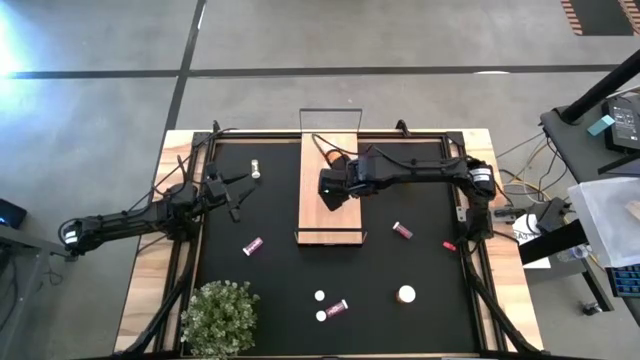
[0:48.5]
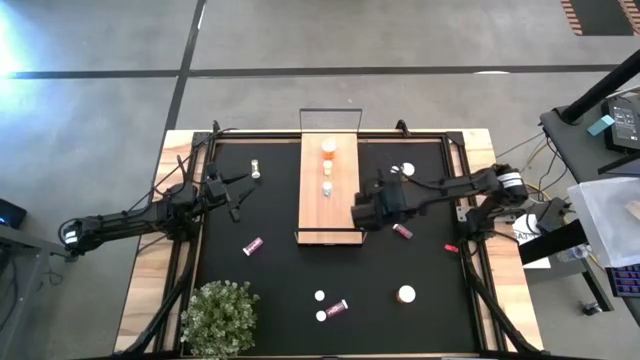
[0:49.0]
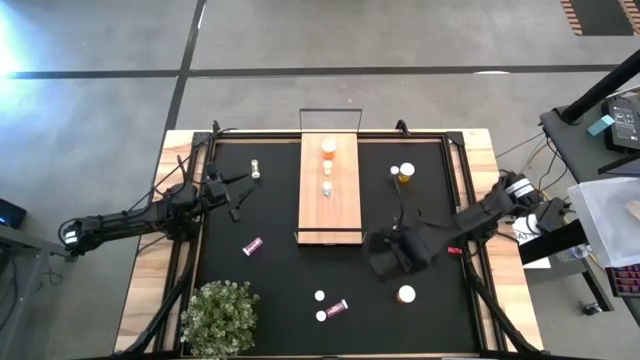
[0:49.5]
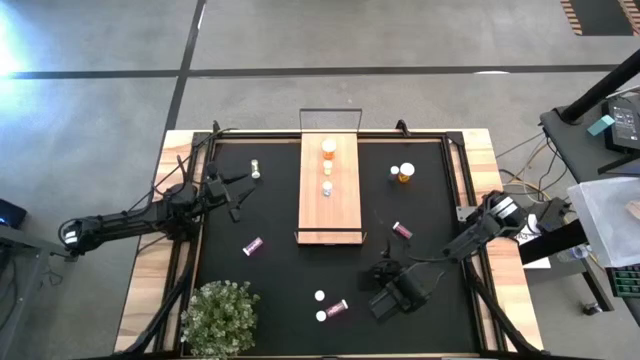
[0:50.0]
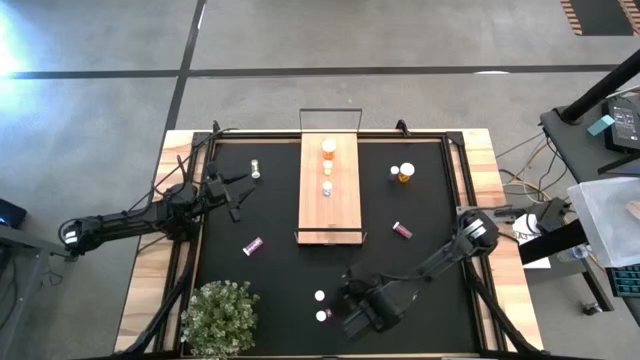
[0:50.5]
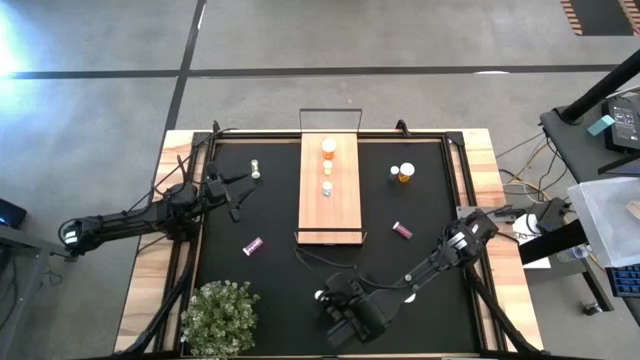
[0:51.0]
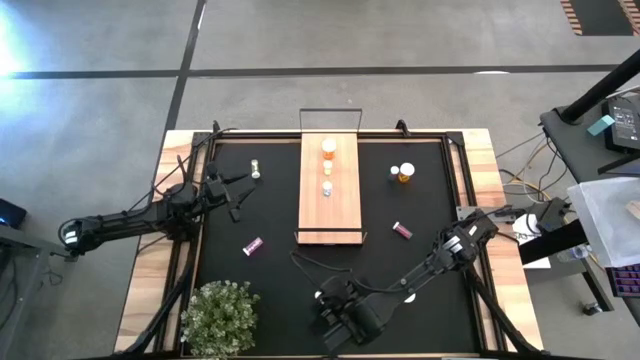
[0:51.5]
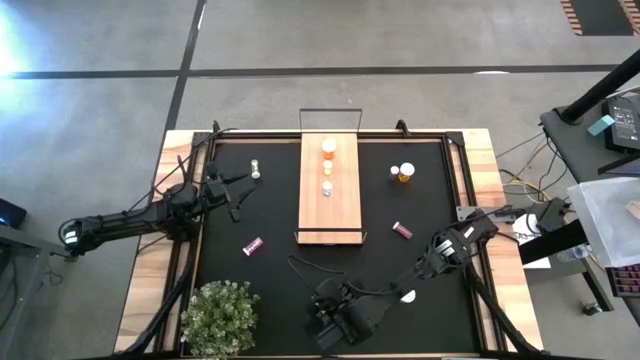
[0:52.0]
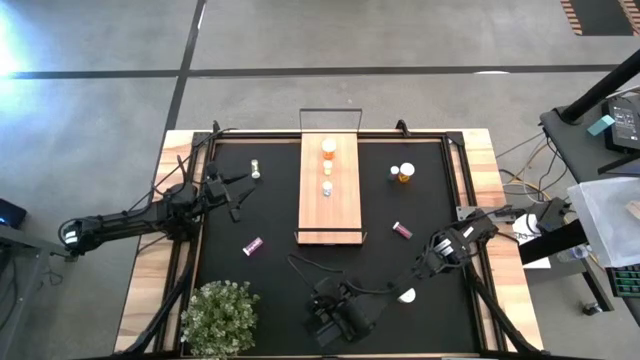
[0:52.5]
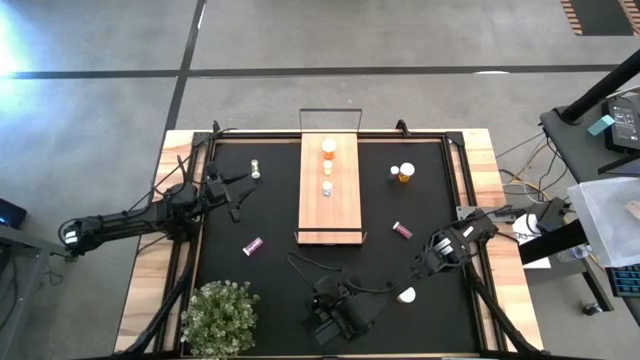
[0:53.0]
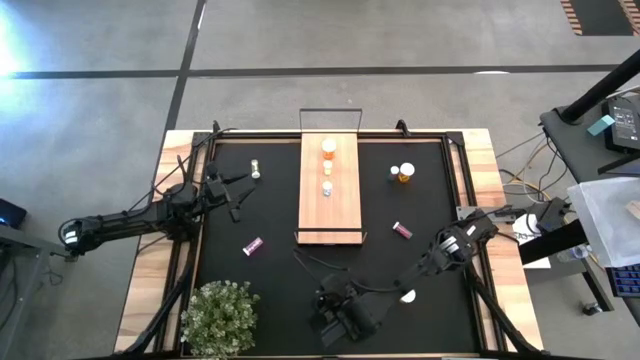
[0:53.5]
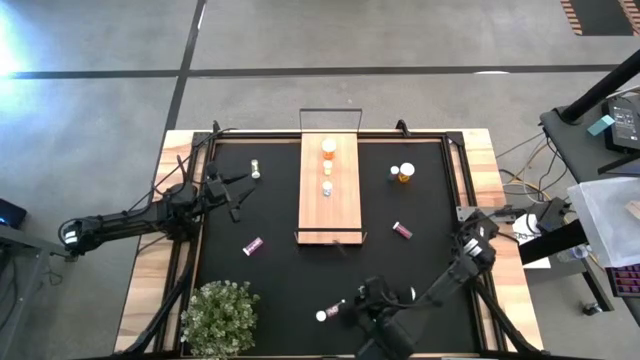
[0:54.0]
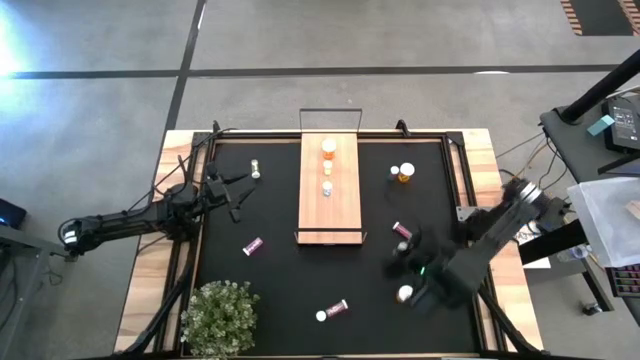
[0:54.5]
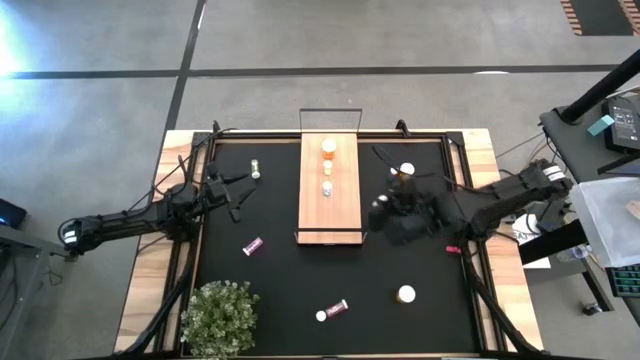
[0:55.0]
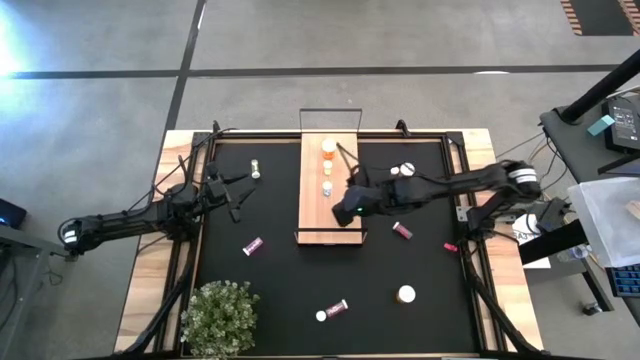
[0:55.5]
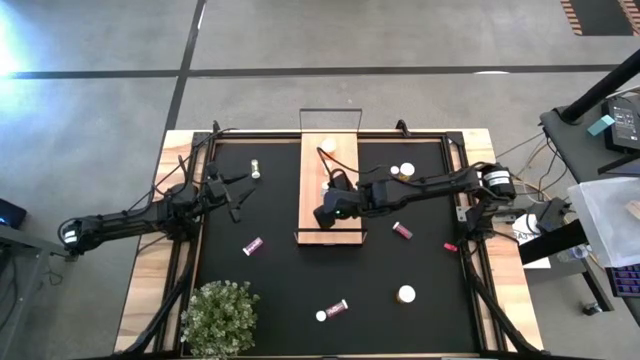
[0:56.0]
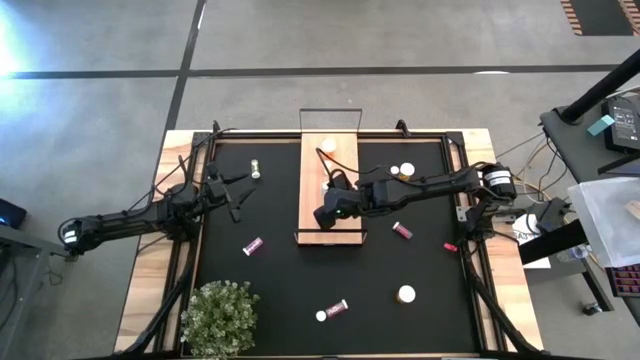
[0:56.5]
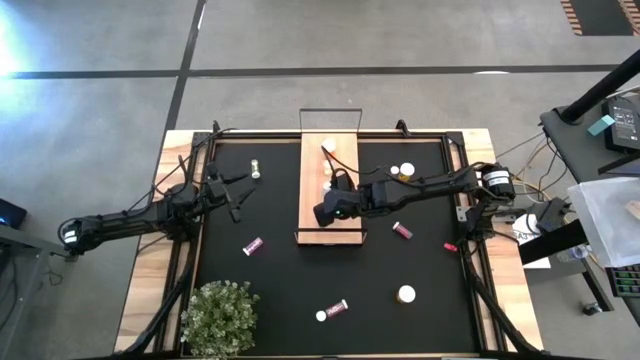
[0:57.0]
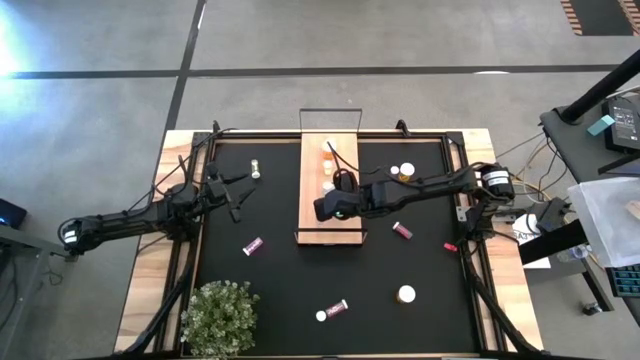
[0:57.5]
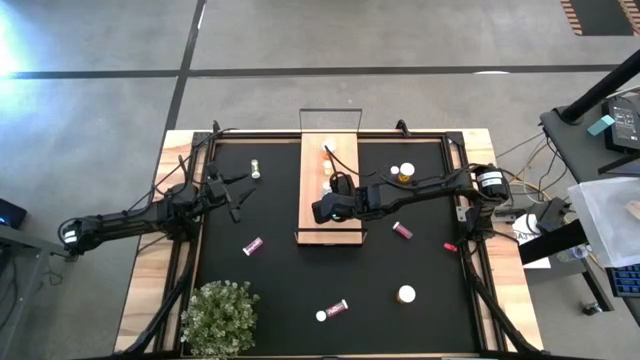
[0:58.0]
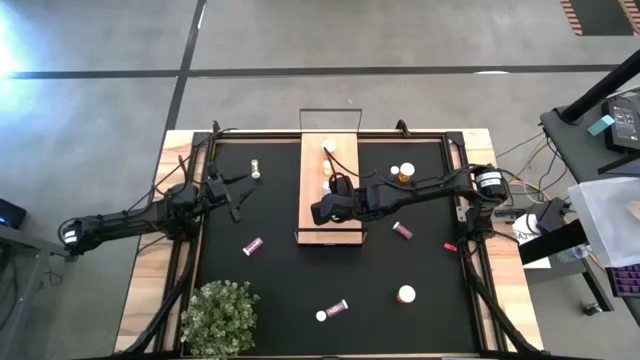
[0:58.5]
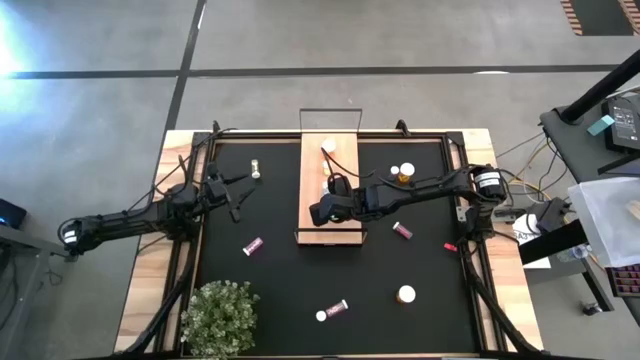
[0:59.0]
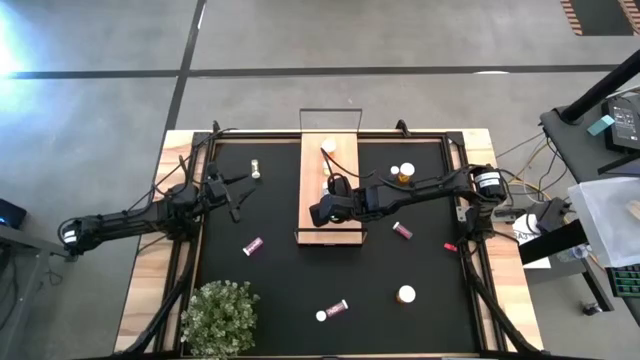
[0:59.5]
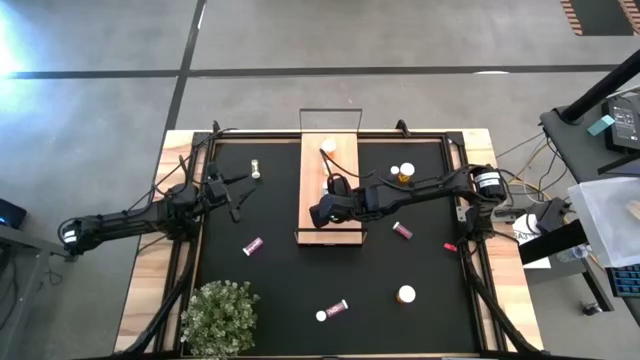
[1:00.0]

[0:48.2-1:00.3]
Task: Pick and place medicine bottles onto shelf by color
Put the bottom center pink medicine bottle on the shelf

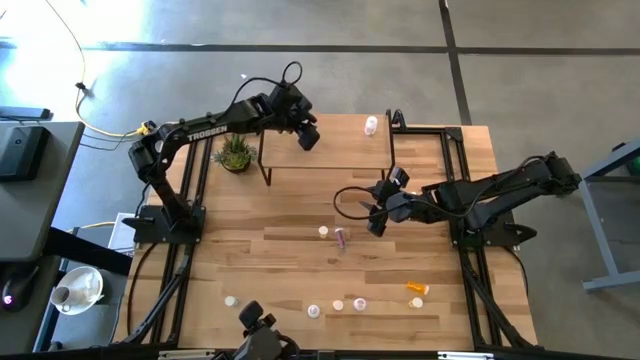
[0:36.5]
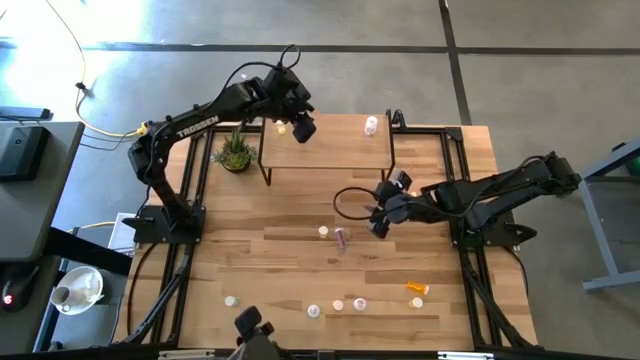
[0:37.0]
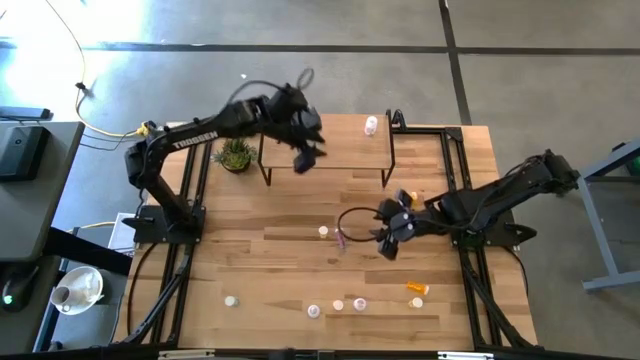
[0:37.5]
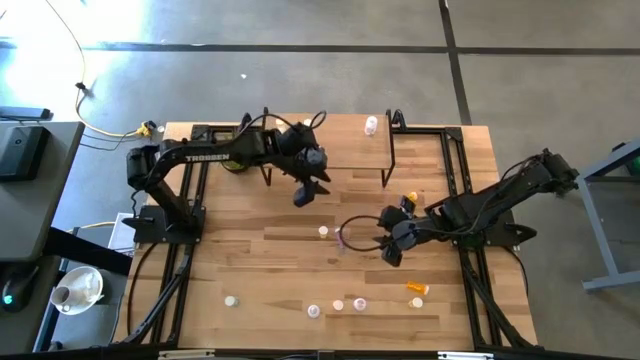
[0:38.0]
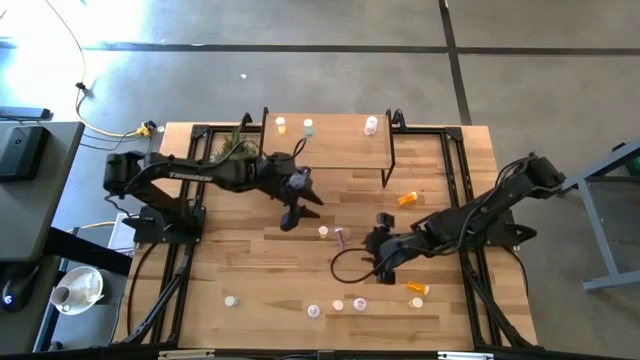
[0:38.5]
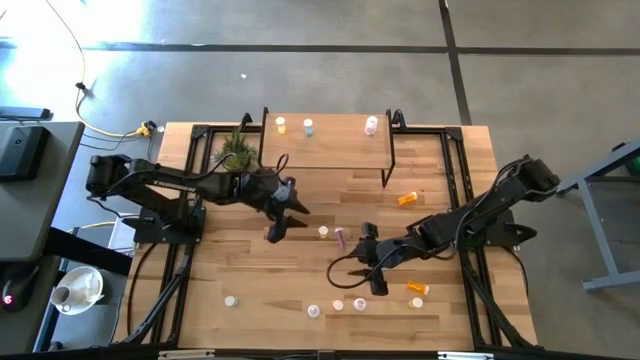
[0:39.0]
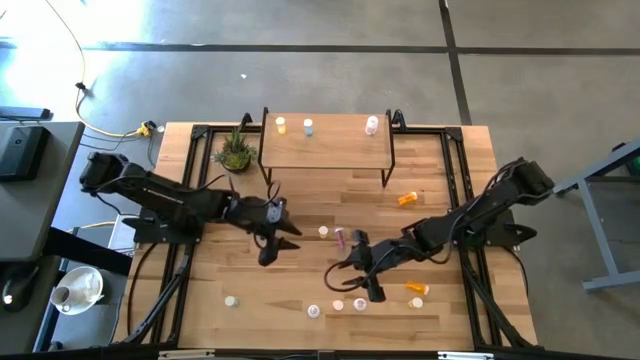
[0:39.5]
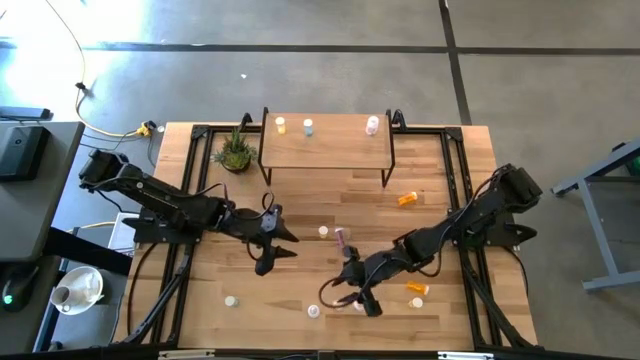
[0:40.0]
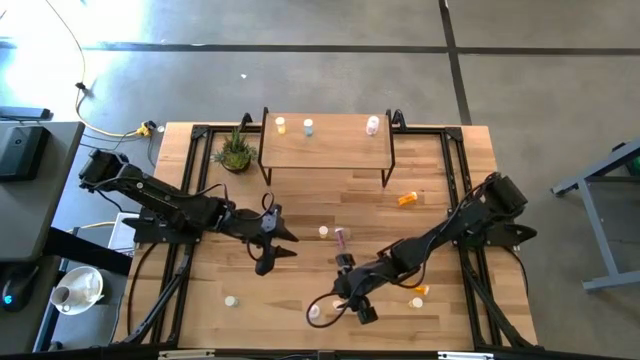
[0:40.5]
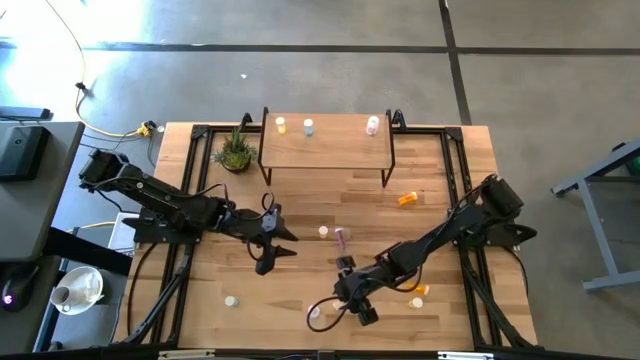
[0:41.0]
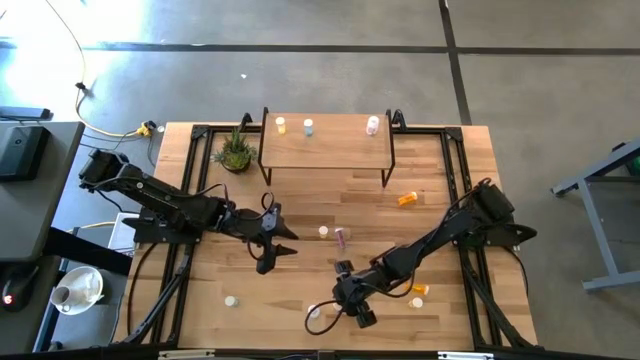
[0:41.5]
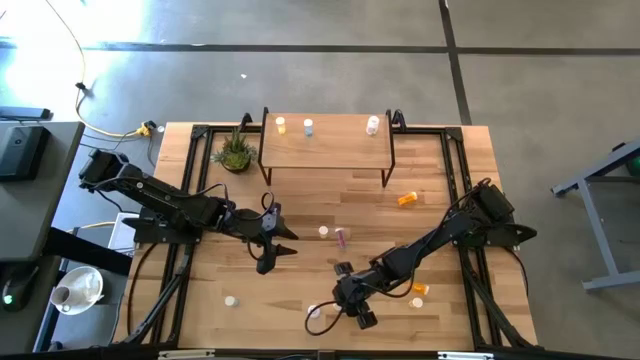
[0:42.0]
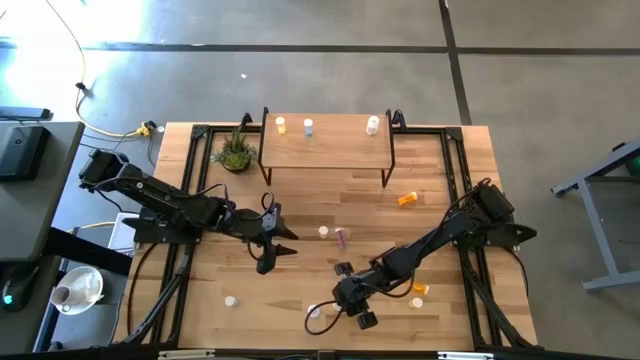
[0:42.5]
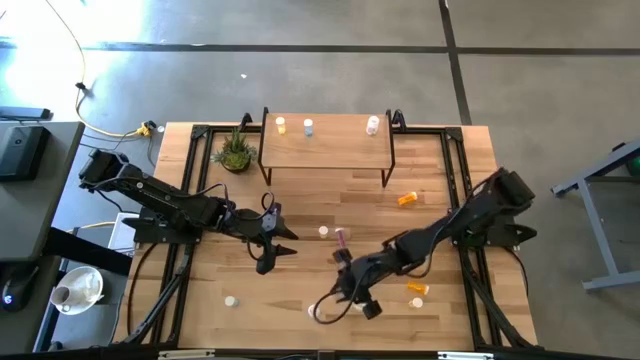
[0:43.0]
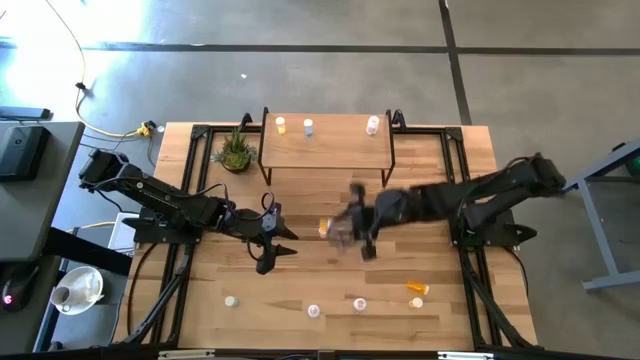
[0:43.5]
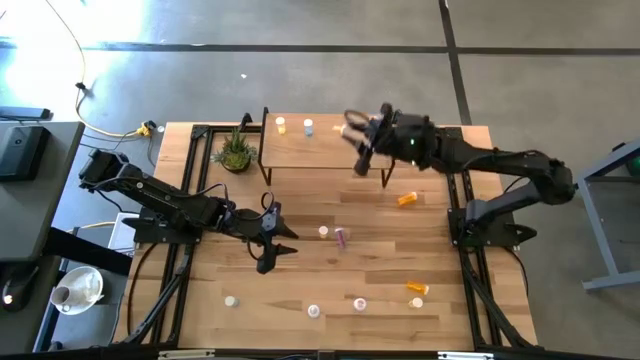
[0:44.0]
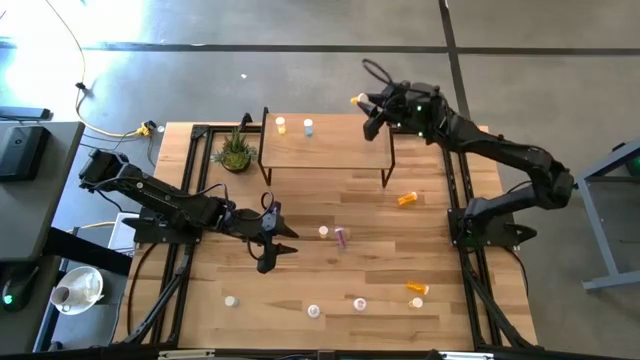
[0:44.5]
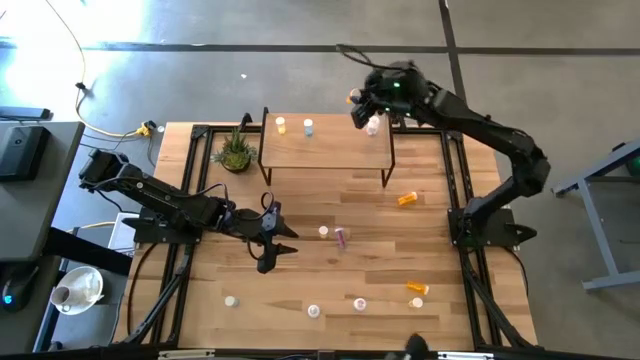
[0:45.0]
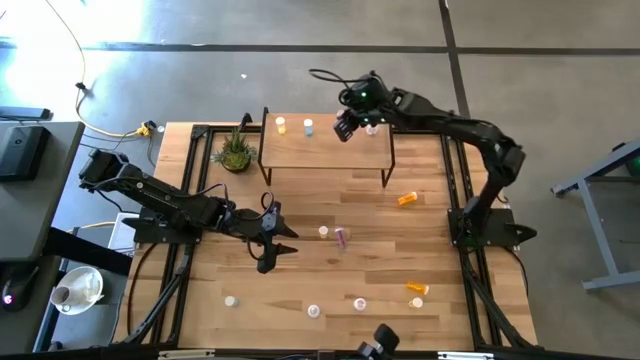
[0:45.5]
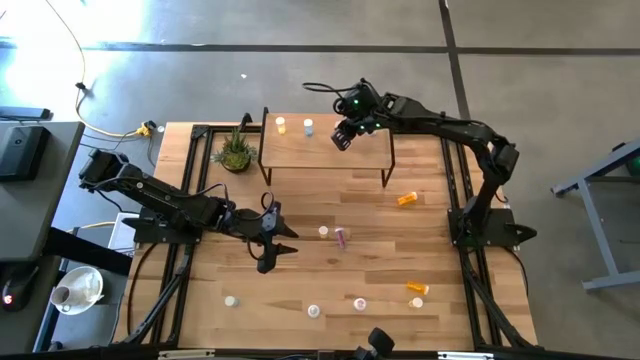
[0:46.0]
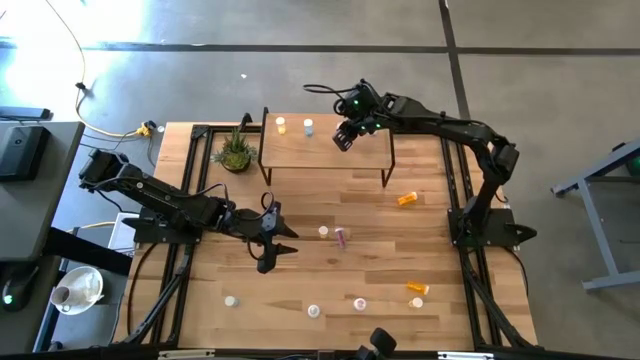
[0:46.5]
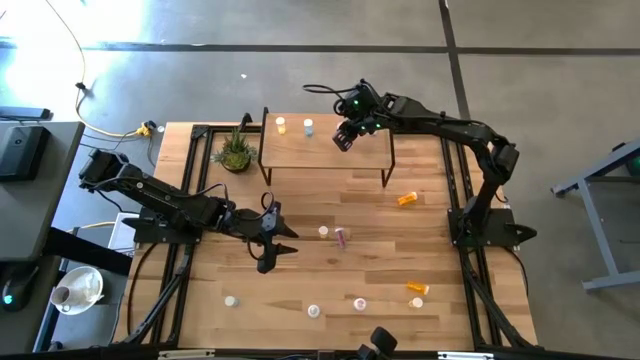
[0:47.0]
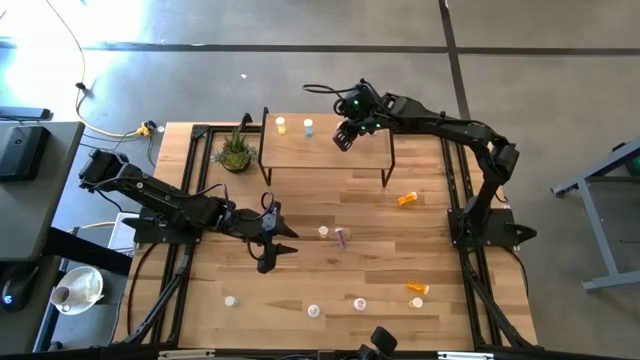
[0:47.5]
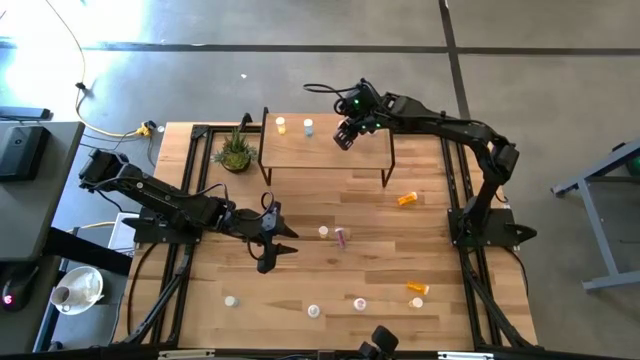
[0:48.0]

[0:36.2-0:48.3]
Task: Pick and place medicine bottles onto shelf by color
Put the bottom left orange pill bottle on the shelf
